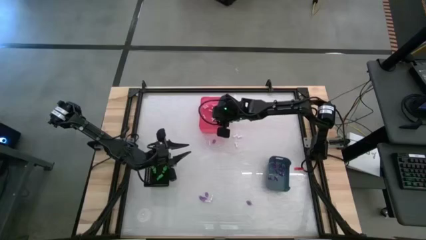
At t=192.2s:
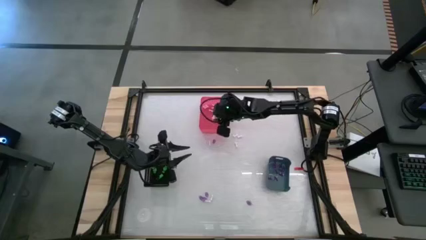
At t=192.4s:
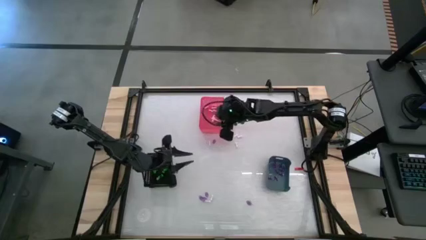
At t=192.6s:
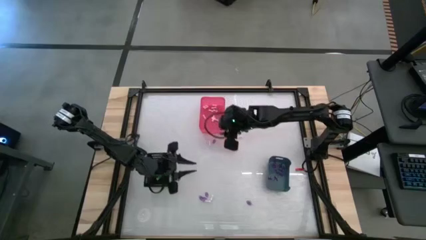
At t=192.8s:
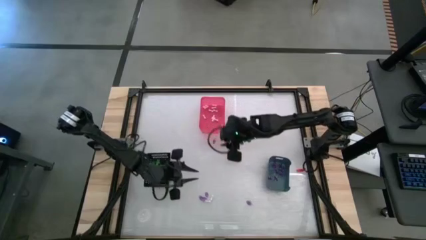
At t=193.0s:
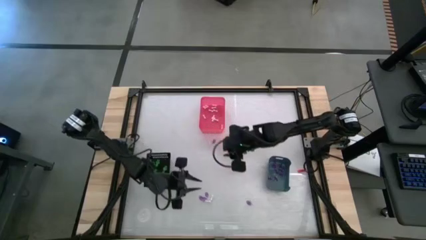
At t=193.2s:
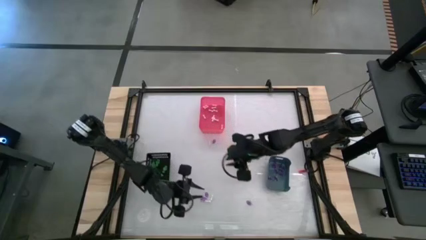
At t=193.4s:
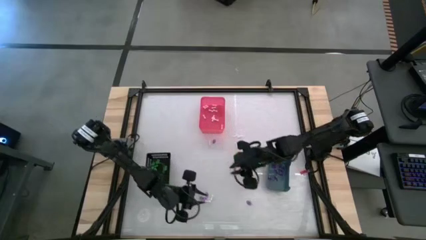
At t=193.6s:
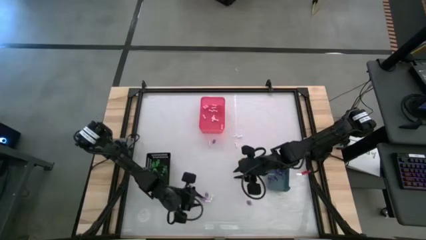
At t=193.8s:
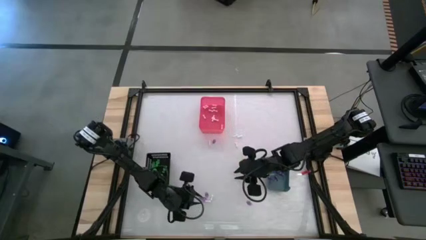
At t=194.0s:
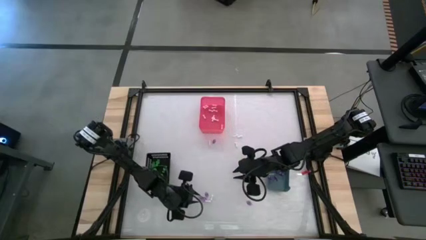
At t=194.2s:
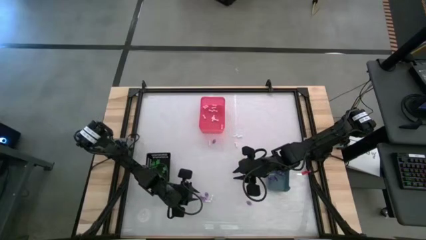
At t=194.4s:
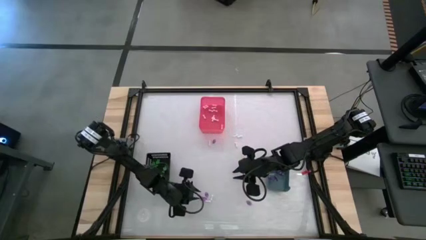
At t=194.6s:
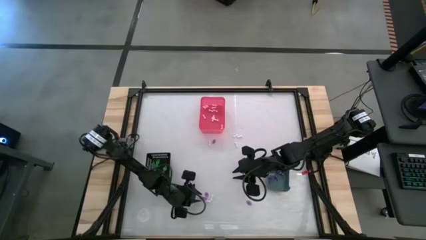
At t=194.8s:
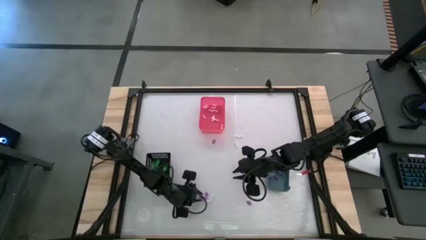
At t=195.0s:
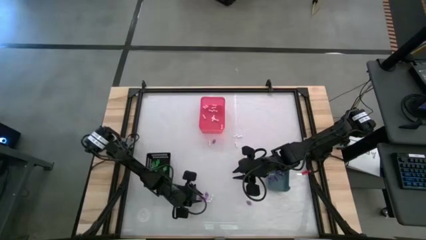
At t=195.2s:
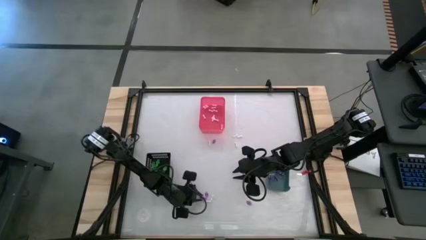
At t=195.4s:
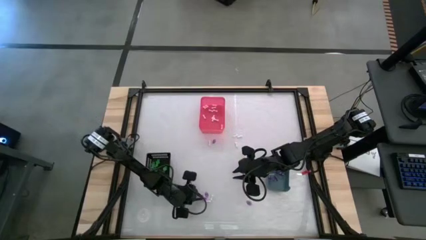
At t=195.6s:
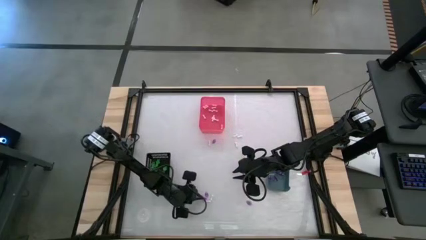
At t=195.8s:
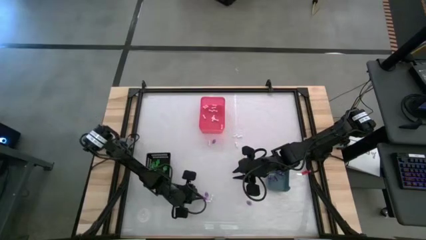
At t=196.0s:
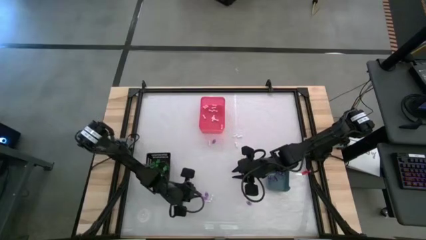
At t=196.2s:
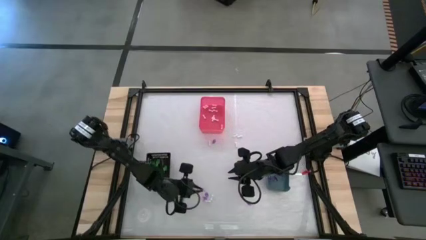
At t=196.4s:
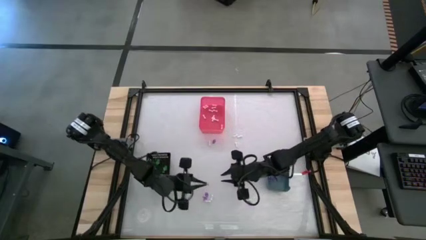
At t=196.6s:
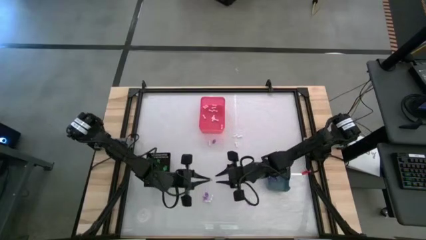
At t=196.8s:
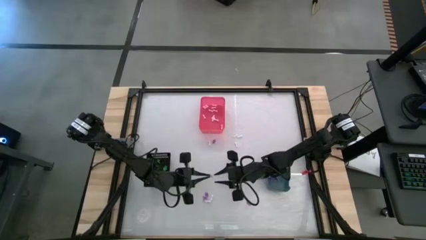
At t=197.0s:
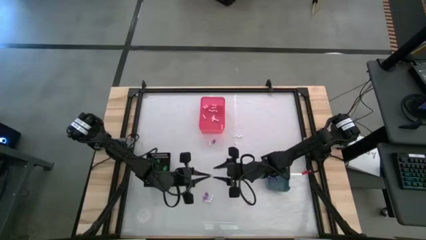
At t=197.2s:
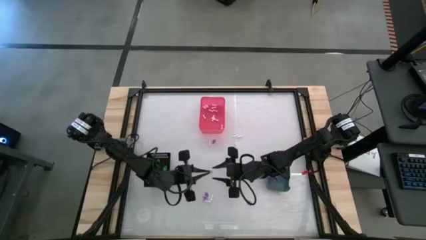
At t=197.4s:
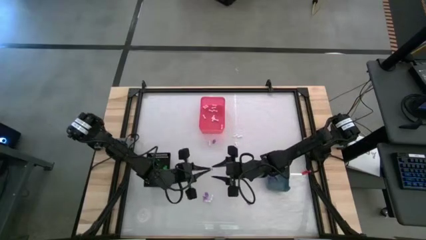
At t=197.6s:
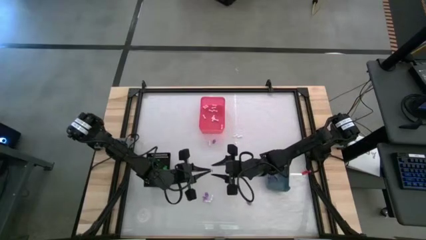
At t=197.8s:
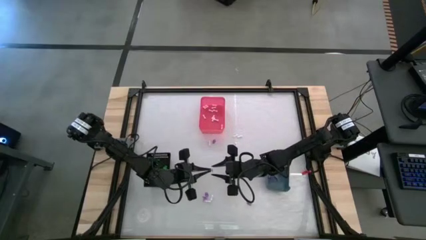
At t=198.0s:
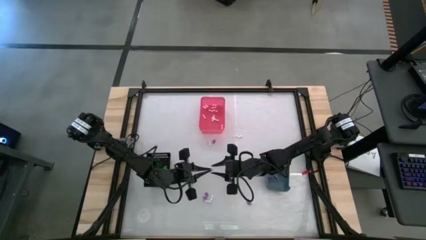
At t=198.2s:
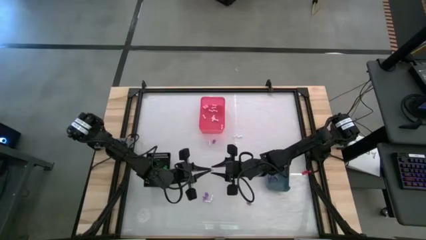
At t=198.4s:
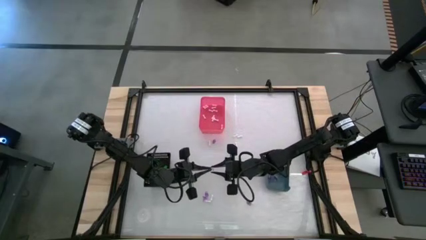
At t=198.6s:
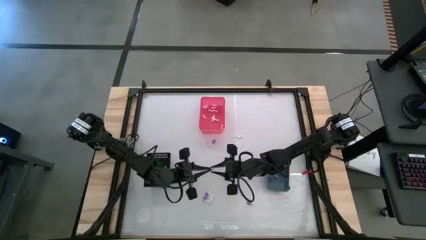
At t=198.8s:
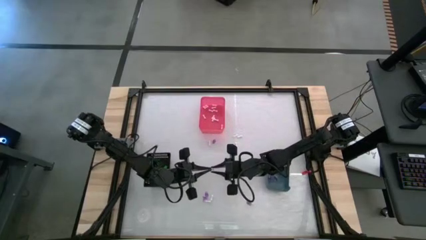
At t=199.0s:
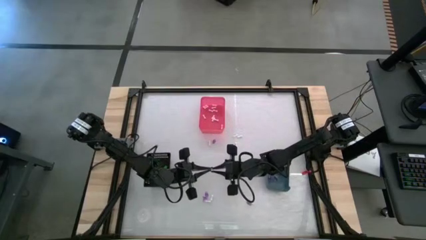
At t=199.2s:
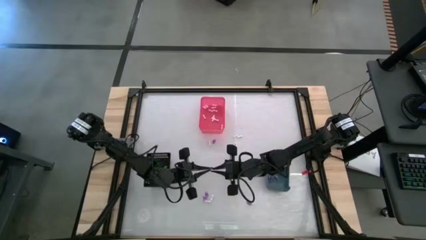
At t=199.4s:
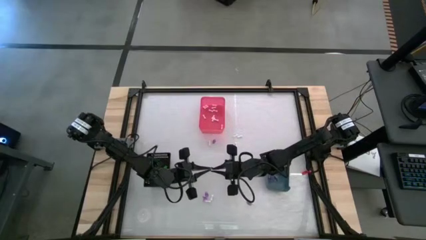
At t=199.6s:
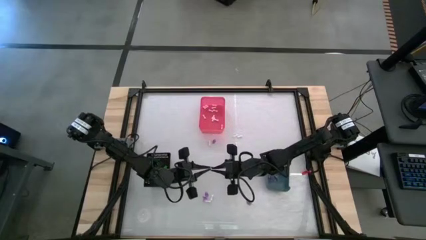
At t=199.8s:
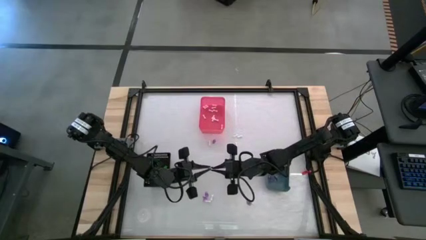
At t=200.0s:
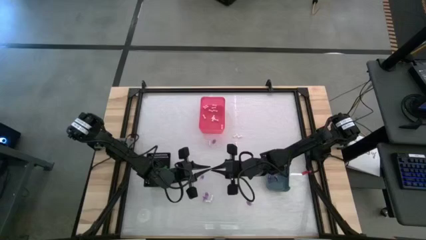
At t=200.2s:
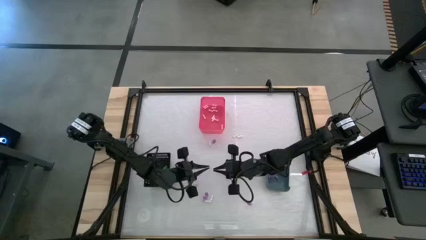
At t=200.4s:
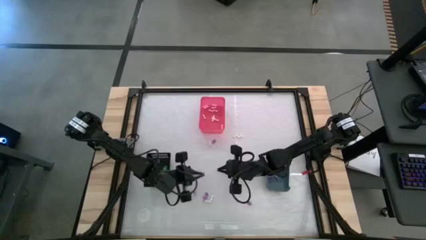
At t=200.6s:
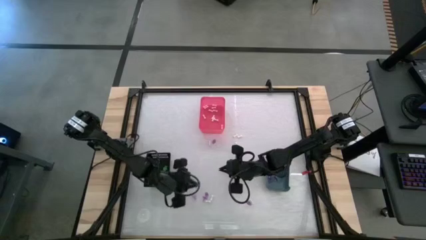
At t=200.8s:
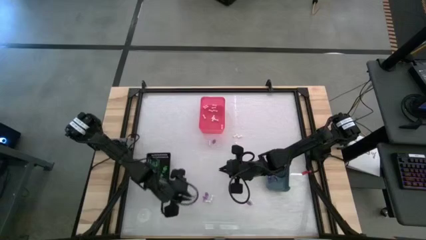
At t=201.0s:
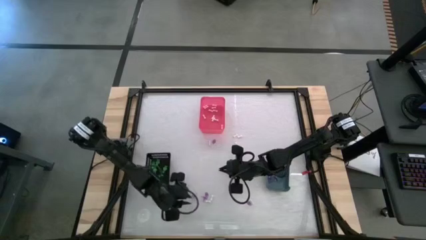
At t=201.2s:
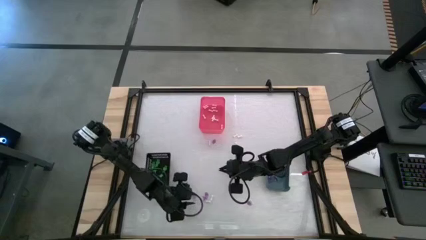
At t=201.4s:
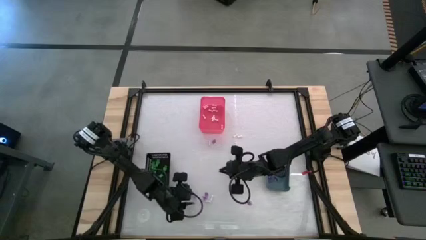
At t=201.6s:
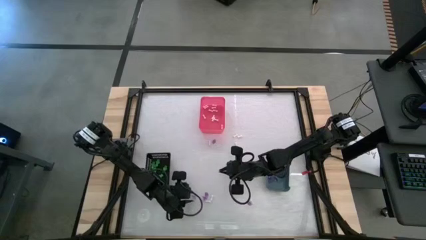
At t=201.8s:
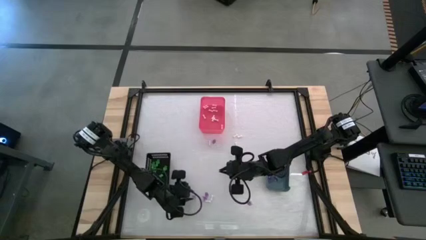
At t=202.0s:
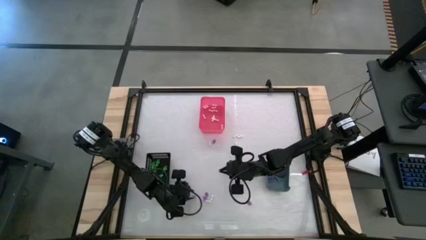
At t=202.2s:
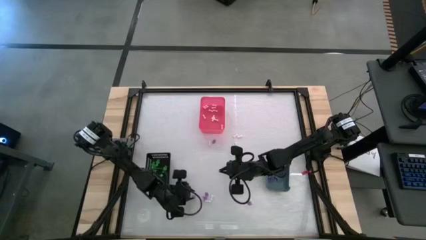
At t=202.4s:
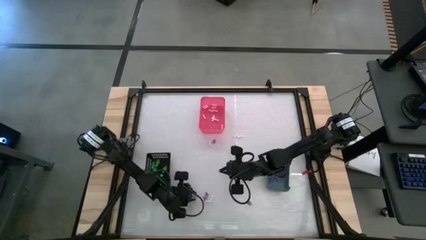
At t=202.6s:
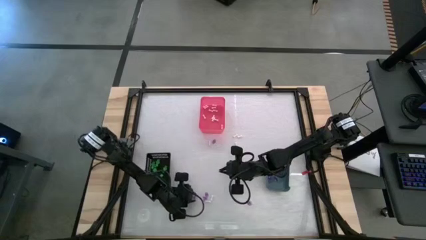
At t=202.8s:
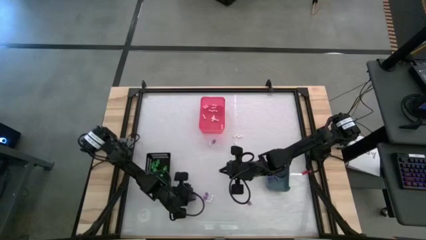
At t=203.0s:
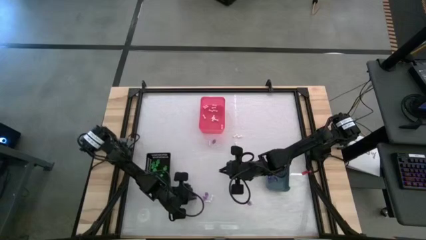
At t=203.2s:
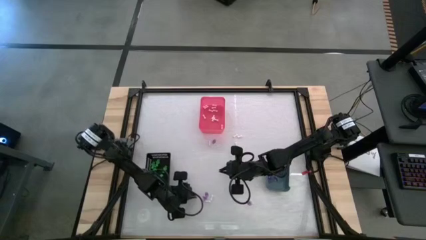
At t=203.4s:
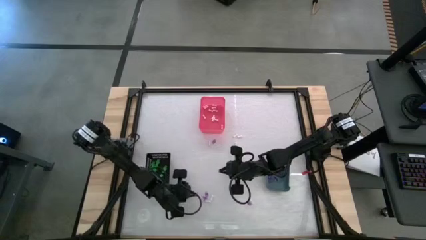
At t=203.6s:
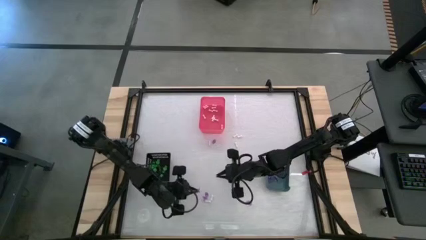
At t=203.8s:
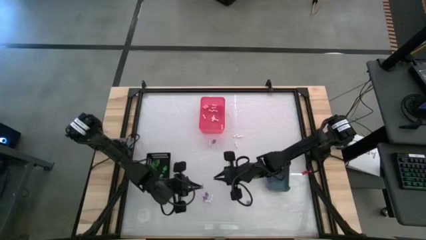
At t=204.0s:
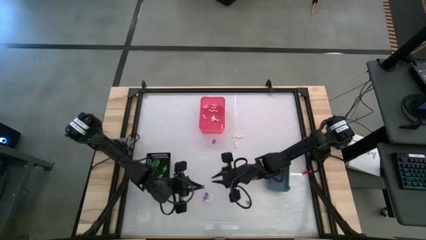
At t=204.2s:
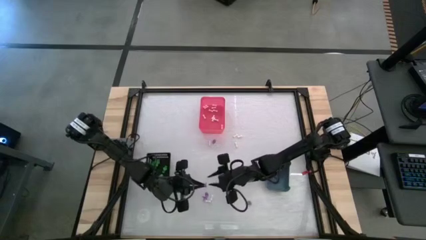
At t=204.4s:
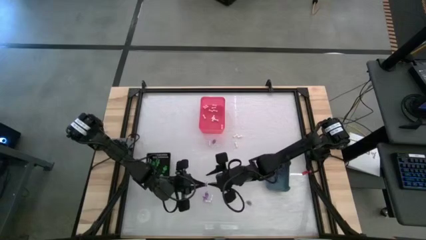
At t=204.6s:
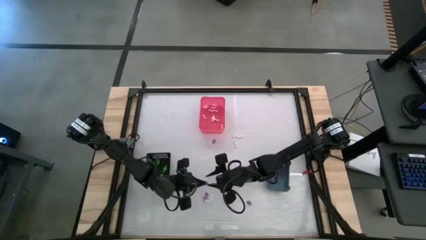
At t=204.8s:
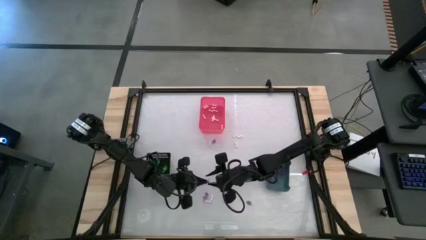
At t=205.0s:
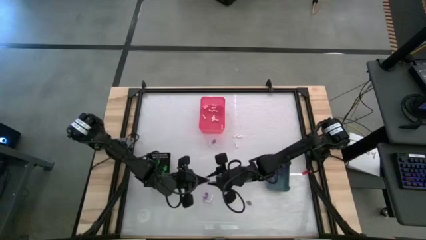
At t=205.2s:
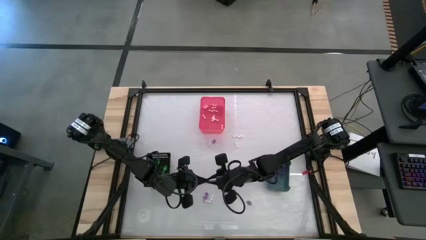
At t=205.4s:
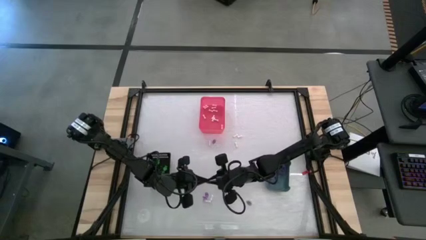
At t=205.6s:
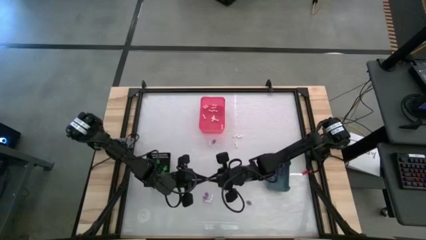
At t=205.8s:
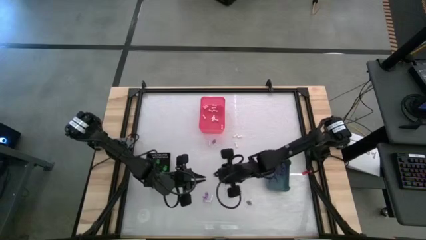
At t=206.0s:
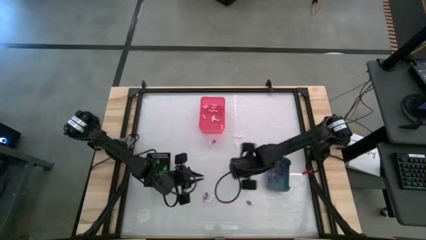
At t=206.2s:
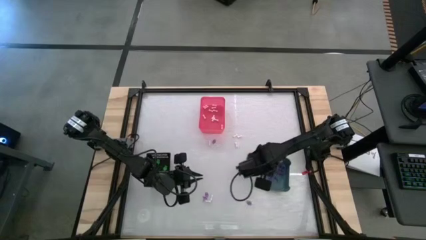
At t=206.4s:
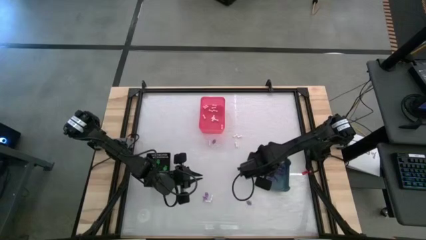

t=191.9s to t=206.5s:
Task: Sort Halloween decoration
Put the witch hat toy into the blue bin

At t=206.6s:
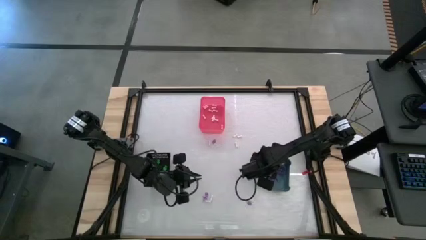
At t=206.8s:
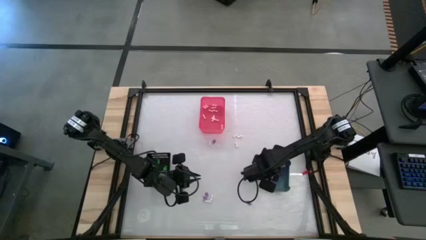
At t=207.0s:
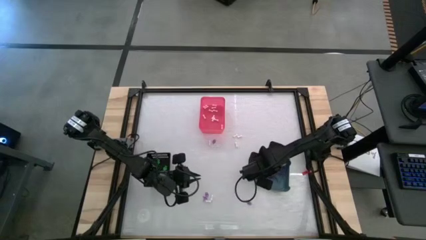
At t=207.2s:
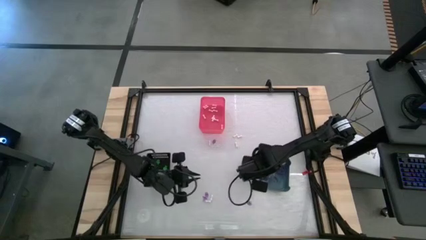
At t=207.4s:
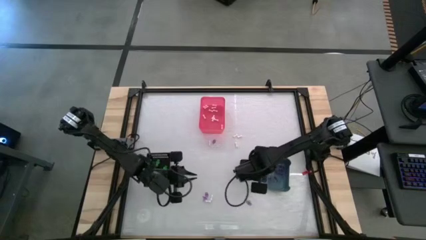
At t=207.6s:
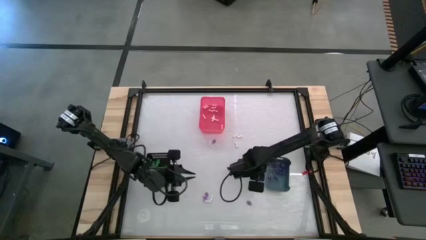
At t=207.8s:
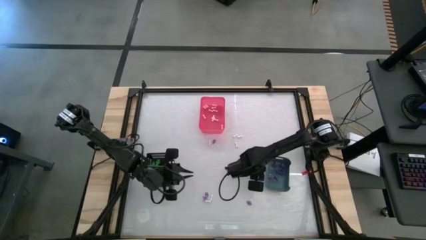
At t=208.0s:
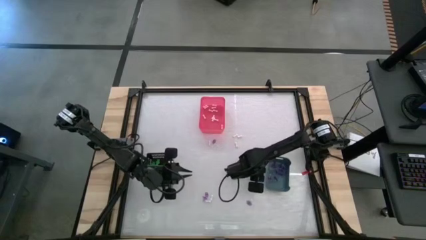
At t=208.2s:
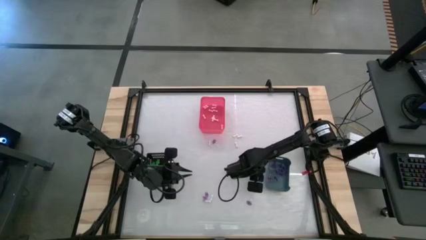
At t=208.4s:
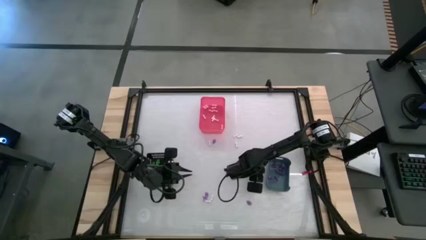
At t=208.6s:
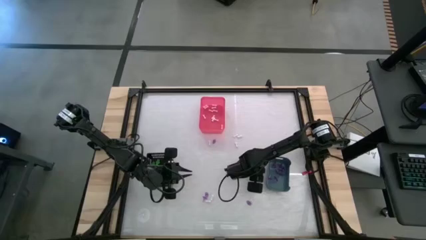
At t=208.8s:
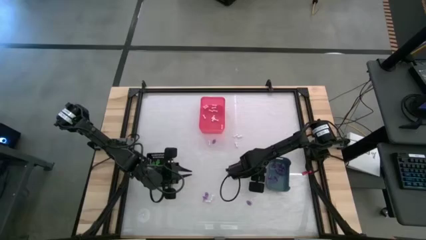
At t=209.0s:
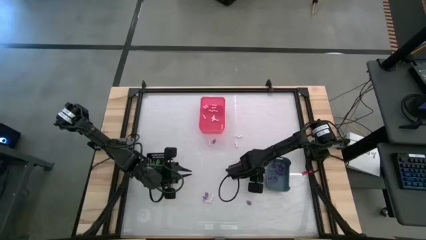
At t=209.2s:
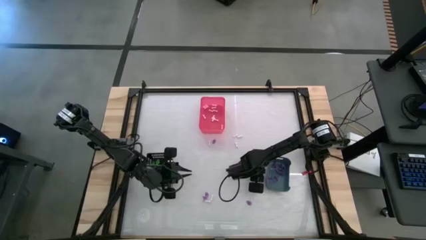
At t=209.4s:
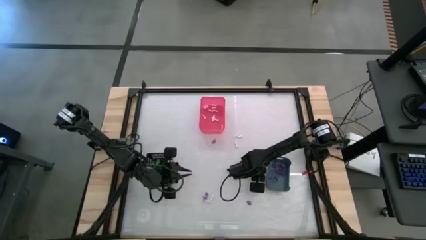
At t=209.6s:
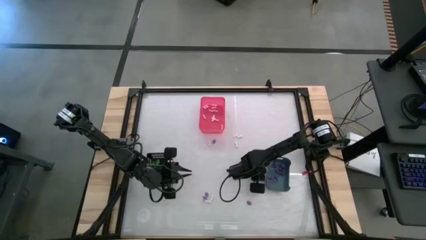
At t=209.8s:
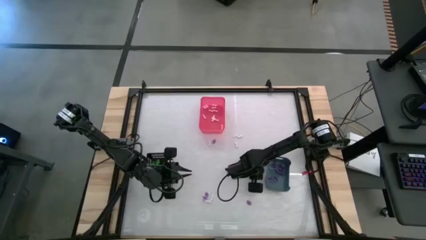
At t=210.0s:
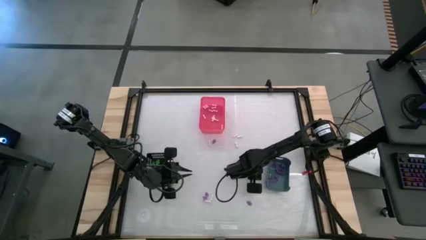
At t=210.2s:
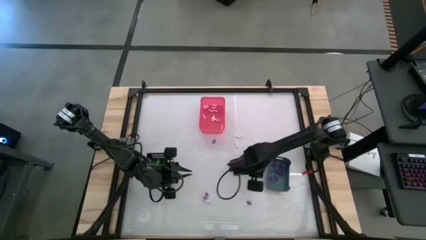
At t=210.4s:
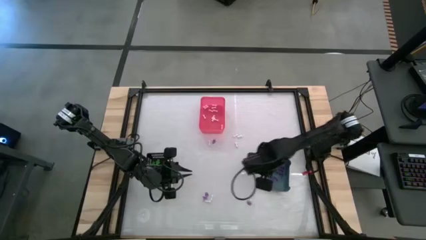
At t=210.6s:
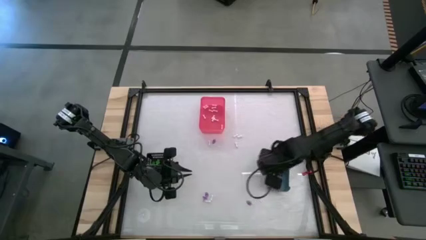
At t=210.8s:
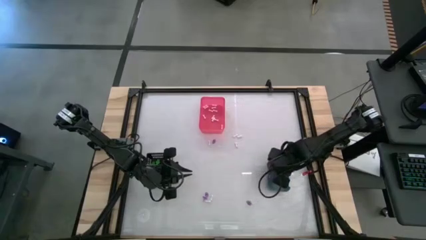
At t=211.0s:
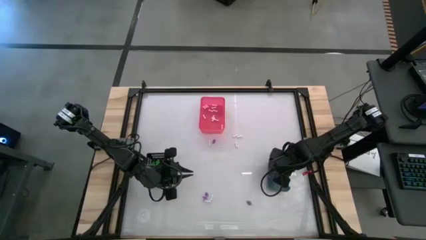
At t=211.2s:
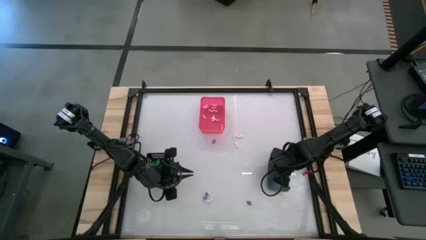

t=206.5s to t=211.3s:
Put the witch hat toy into the blue bin
